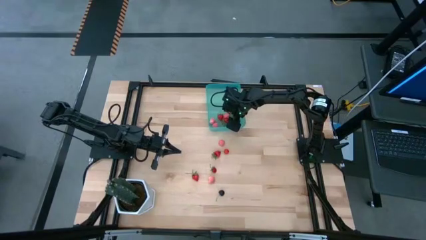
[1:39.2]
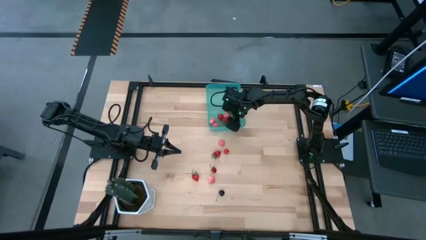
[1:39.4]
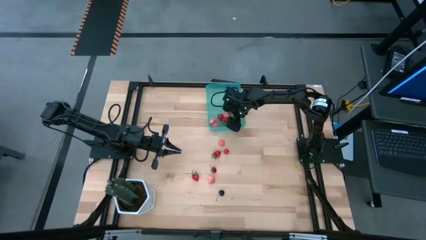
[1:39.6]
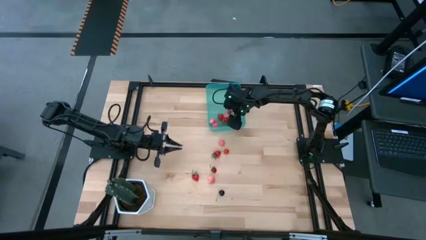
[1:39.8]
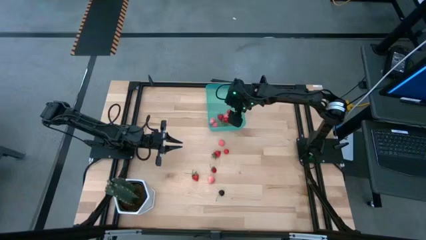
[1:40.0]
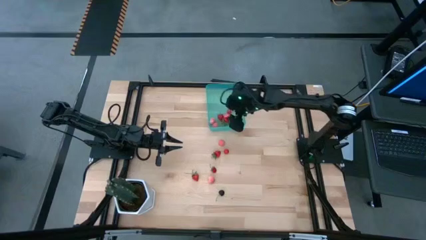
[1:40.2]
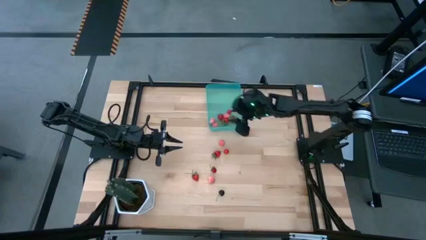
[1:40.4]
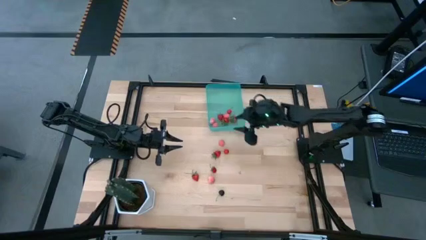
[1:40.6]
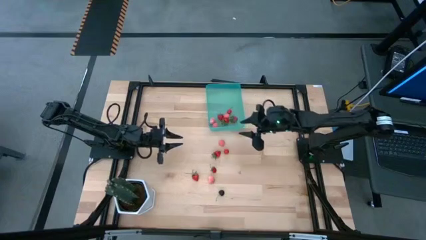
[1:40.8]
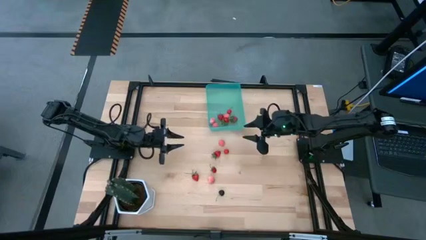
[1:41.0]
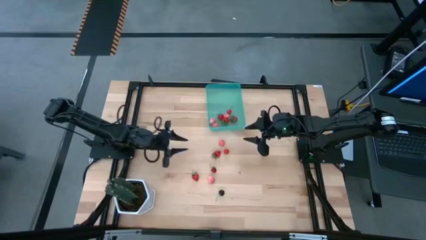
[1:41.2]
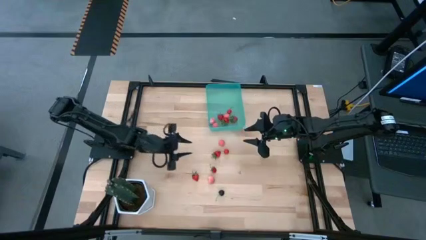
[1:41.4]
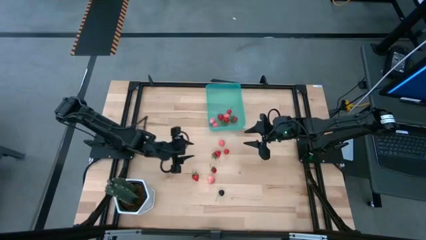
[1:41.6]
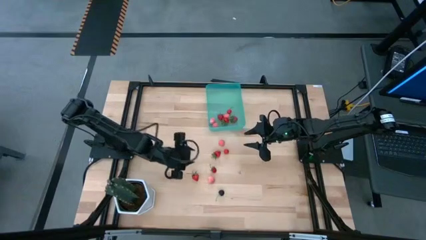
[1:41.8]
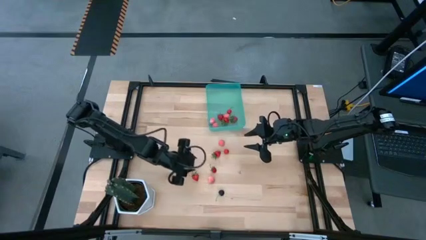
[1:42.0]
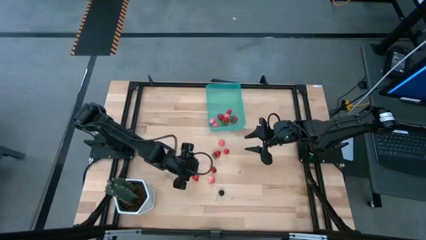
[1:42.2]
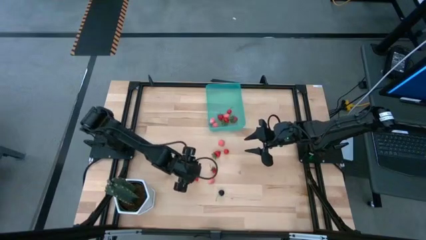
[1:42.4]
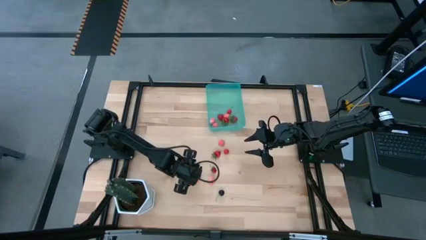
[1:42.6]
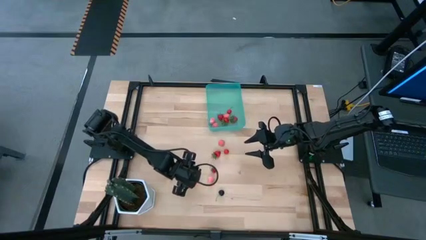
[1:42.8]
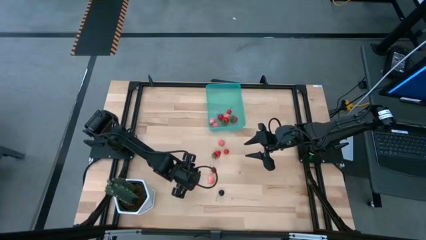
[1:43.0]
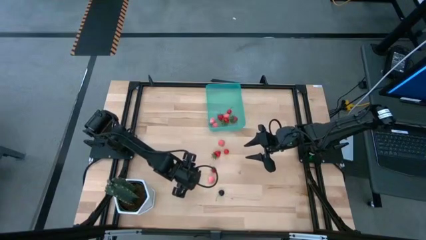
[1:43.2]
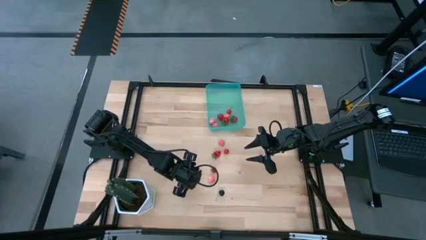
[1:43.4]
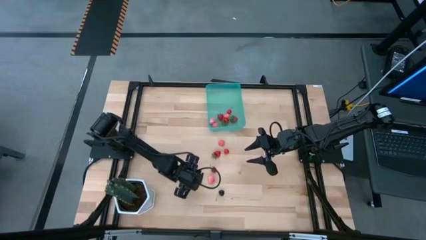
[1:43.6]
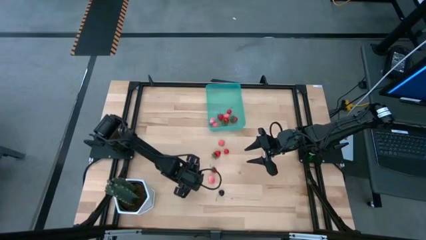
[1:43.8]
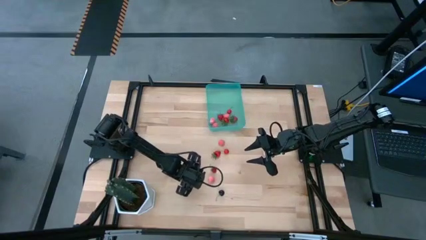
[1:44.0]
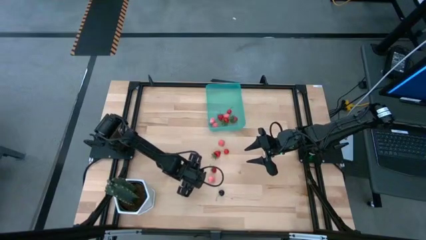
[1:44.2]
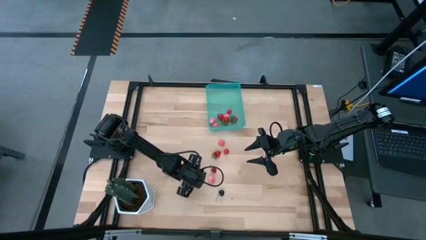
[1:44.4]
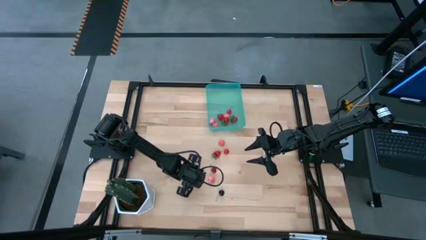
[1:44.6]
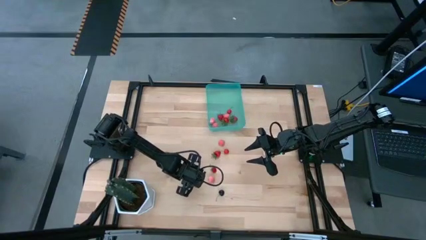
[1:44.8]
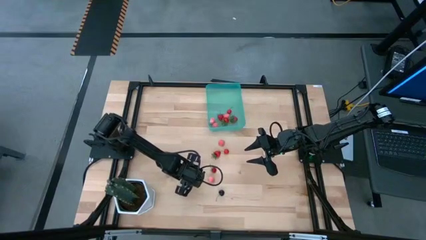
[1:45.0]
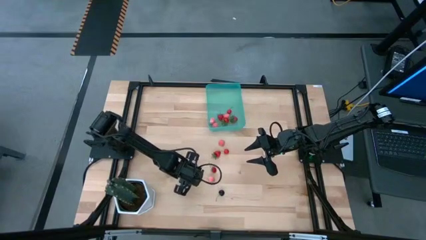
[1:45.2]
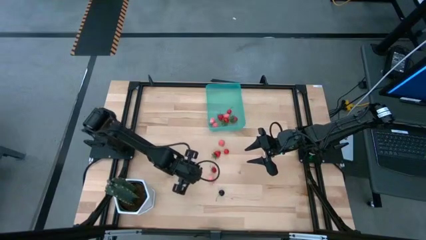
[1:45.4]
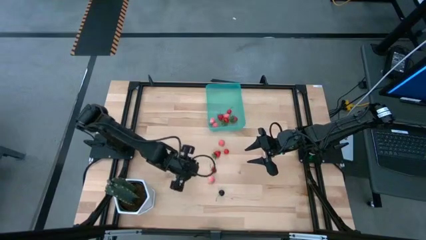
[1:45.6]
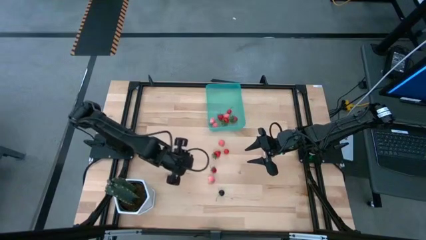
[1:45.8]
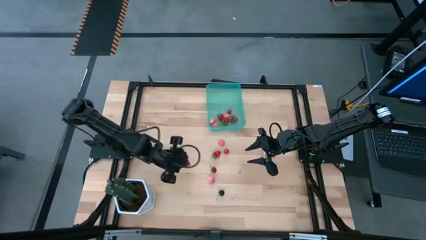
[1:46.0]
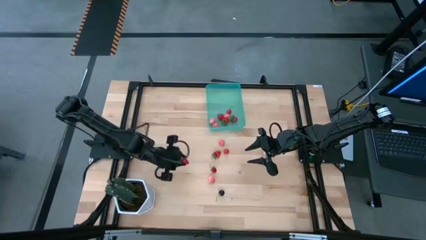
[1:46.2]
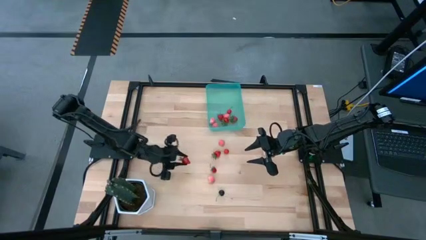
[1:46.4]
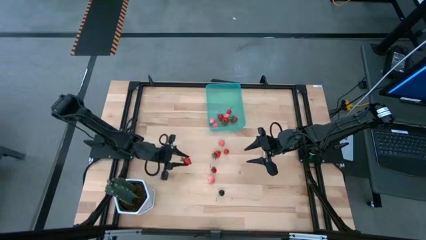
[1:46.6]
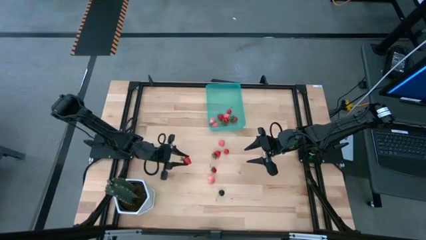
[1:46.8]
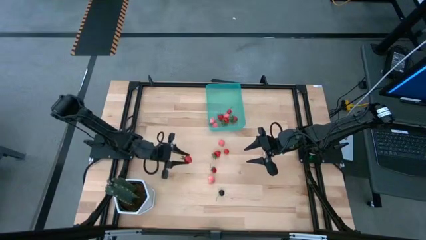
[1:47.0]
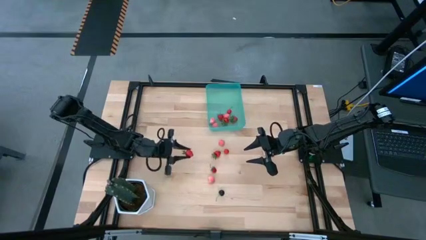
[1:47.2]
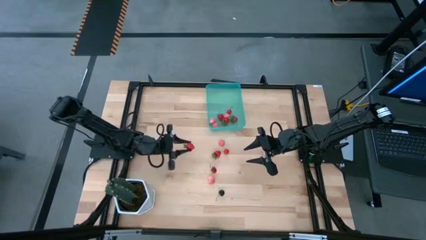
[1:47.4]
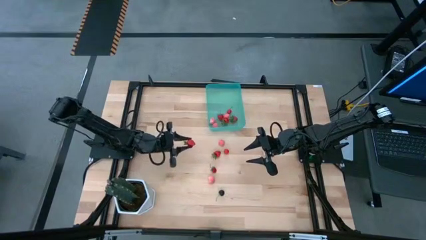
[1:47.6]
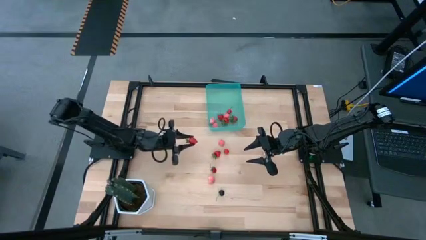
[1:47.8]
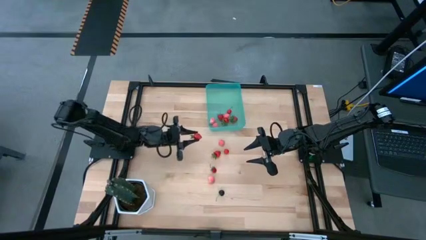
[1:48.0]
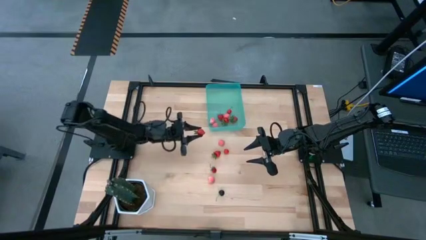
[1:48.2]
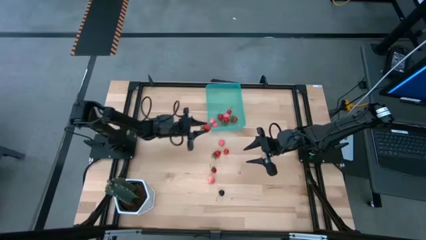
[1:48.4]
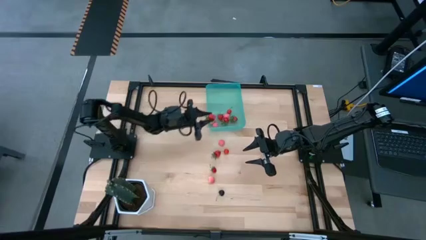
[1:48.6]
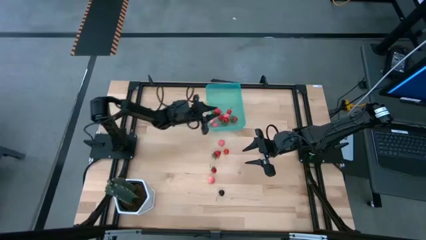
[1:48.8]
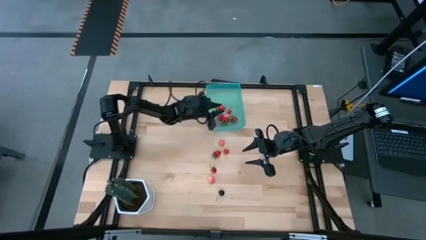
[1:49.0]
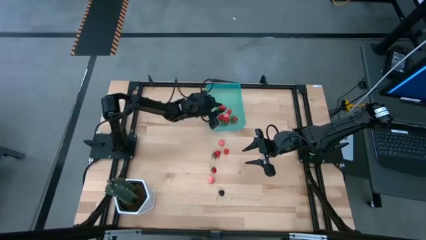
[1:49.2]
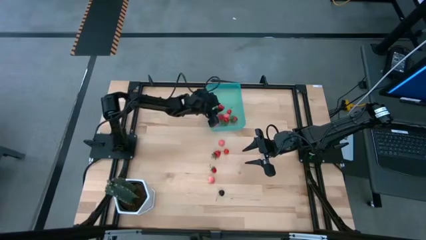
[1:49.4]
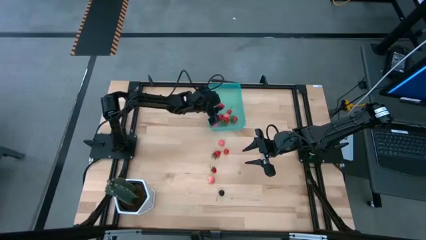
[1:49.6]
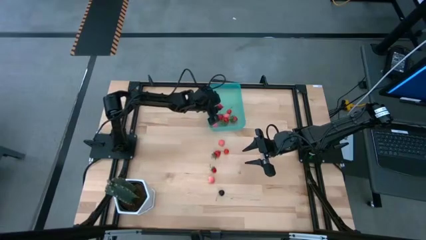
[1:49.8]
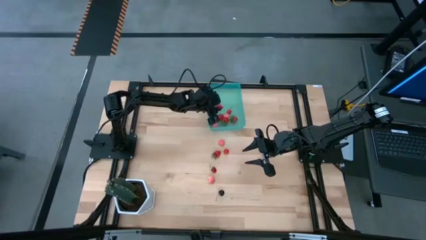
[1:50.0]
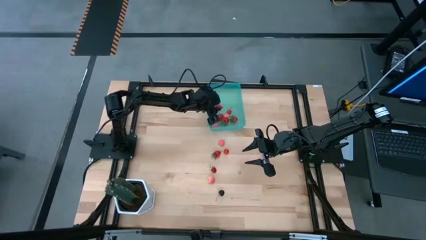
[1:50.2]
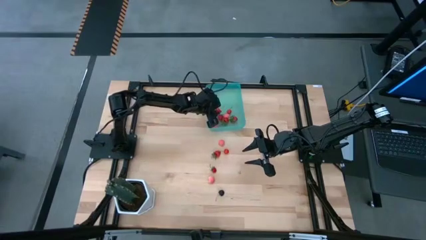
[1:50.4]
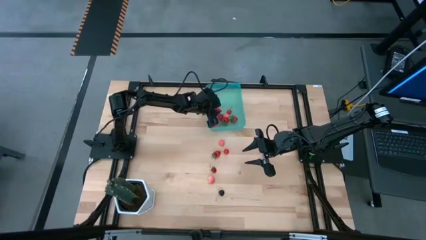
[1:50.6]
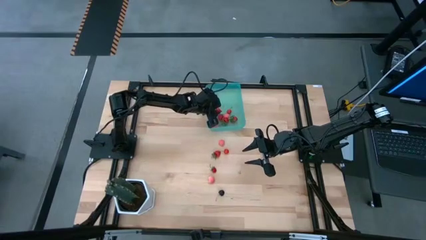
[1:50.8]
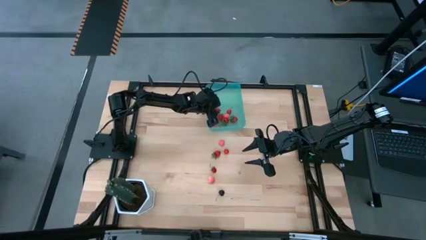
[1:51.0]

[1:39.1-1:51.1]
Task: Pick and placing Produce into tupperware
Put the red strawberry into the blue bin

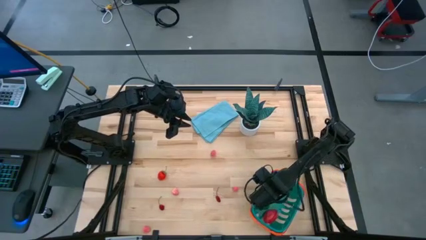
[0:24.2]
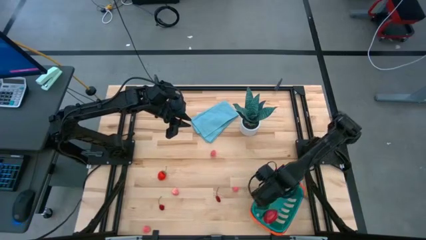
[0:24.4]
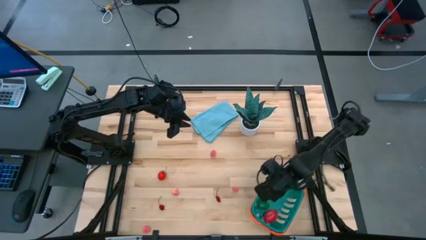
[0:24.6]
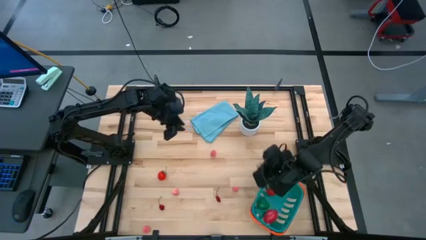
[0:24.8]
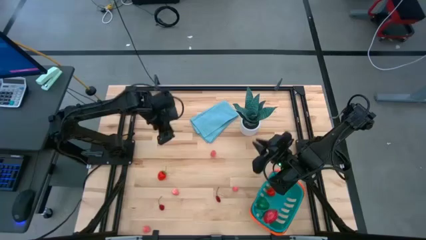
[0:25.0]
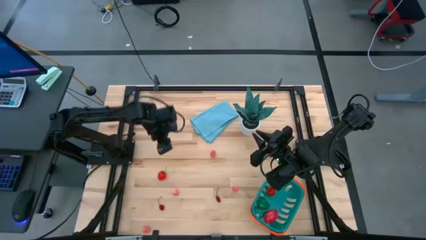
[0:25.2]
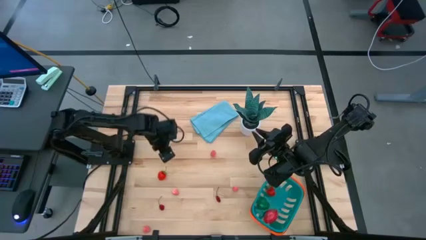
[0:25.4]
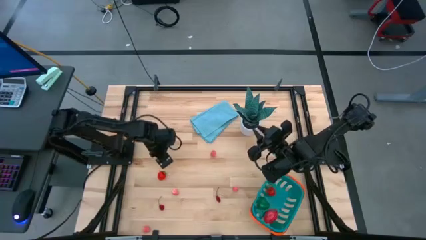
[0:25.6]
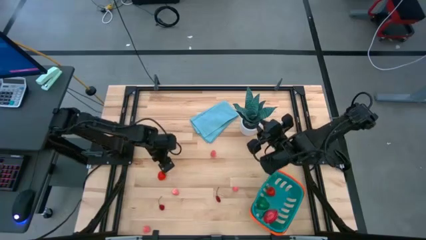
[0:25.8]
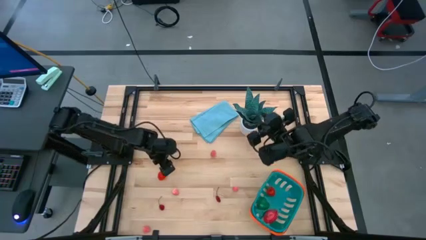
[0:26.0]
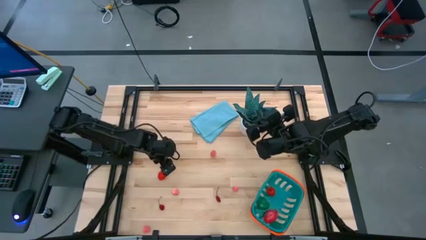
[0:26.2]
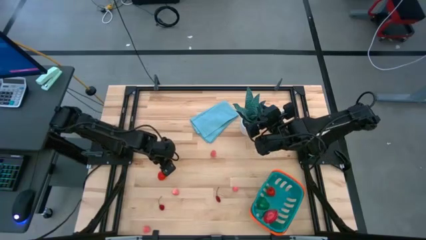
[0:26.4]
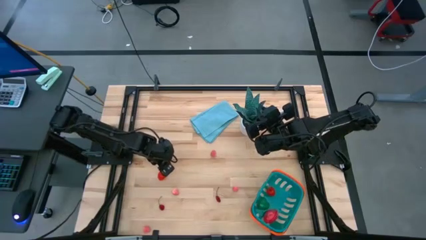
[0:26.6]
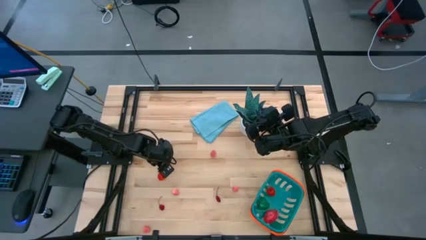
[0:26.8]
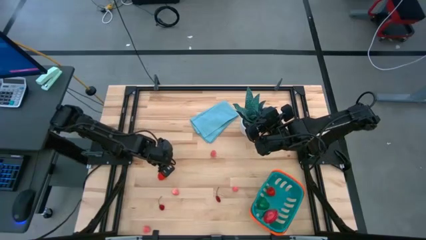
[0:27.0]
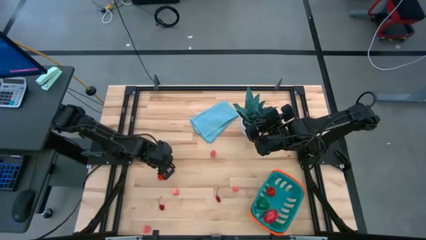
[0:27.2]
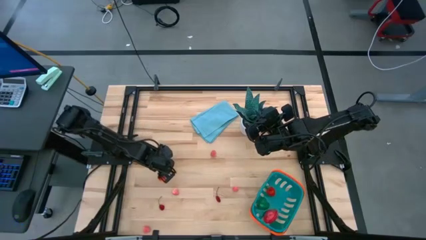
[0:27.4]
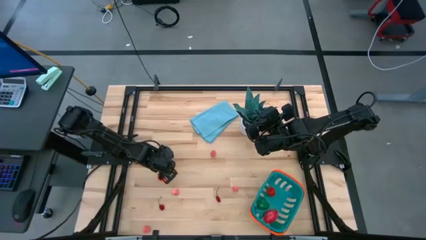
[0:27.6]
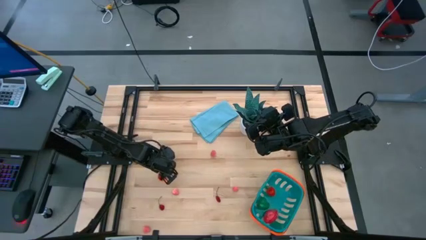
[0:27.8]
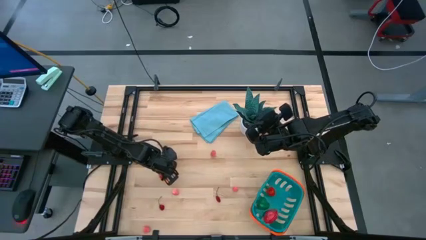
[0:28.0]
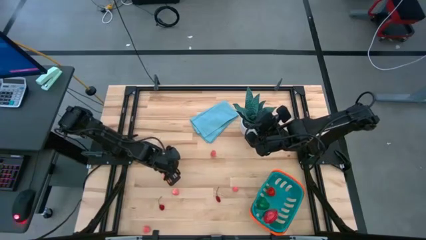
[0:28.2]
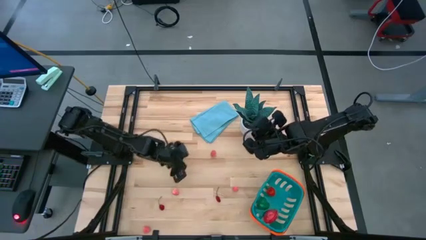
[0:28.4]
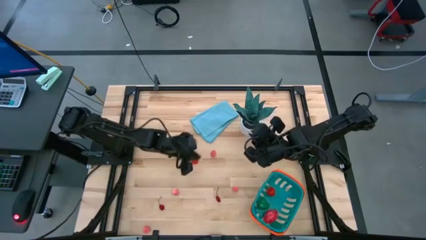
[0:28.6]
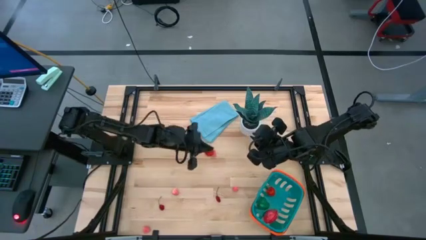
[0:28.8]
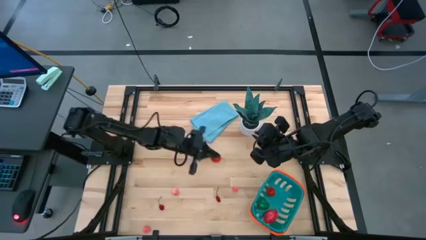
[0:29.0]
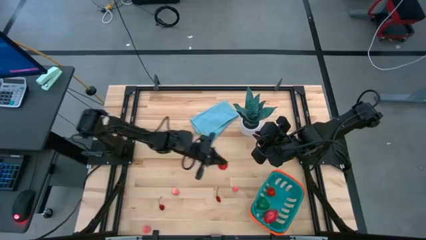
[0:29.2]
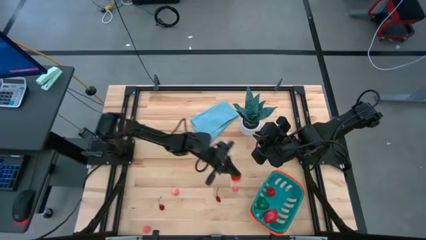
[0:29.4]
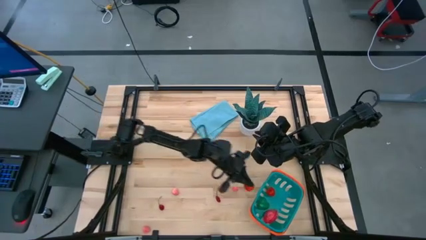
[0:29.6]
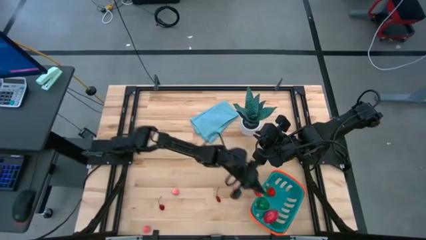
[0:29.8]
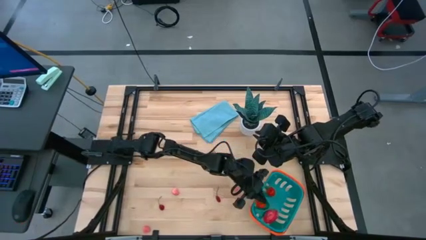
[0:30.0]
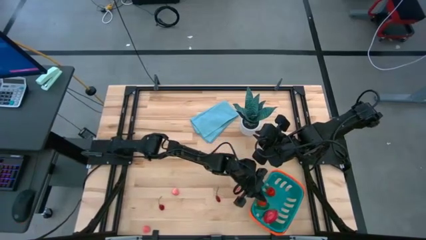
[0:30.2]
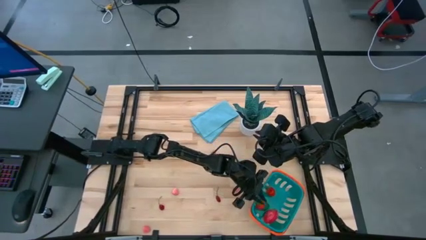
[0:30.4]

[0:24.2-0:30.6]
Task: Pick and placing Produce into tupperware
Put the strawberry into the basket
